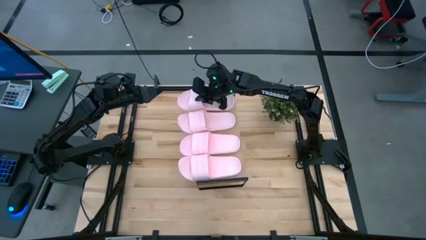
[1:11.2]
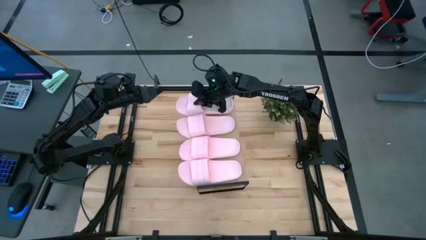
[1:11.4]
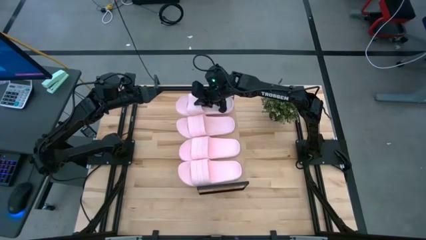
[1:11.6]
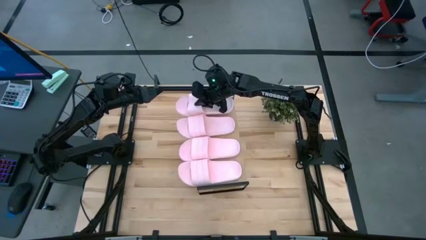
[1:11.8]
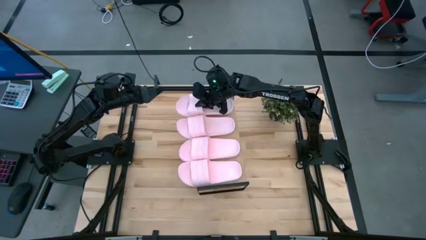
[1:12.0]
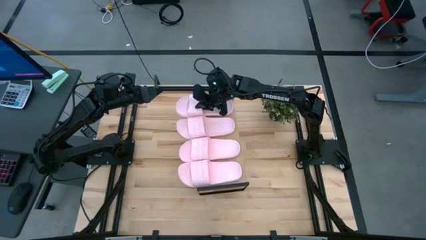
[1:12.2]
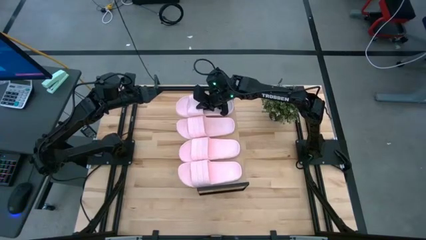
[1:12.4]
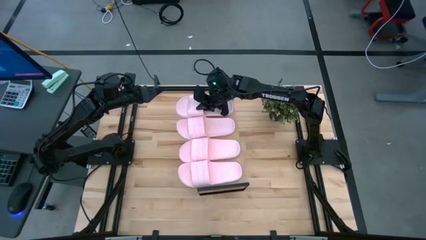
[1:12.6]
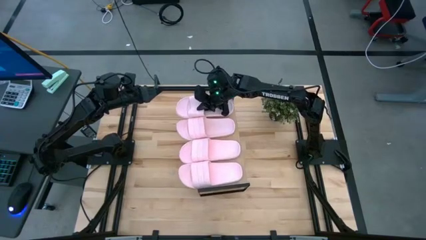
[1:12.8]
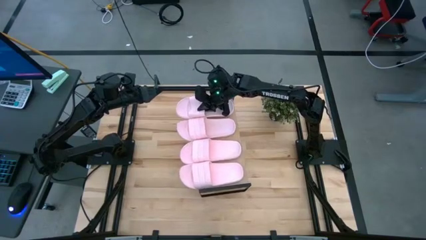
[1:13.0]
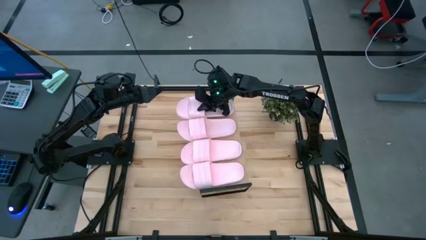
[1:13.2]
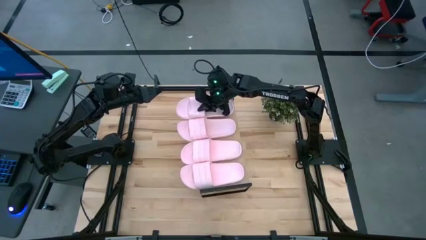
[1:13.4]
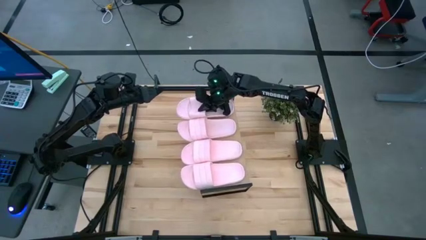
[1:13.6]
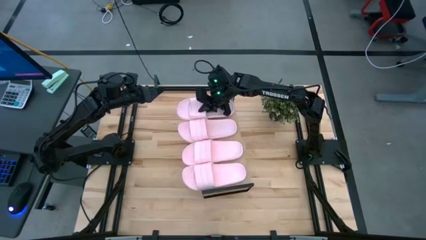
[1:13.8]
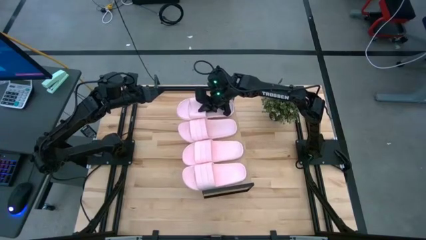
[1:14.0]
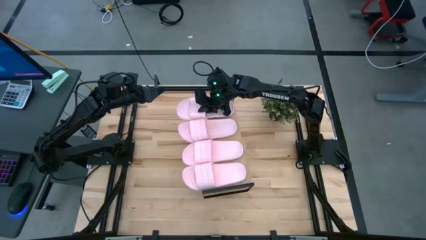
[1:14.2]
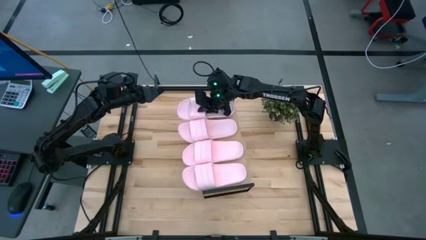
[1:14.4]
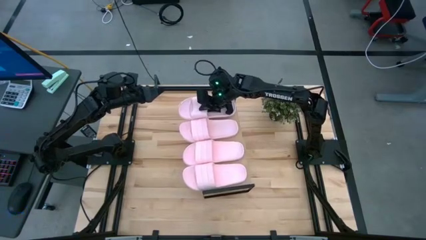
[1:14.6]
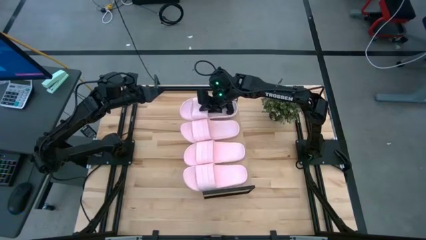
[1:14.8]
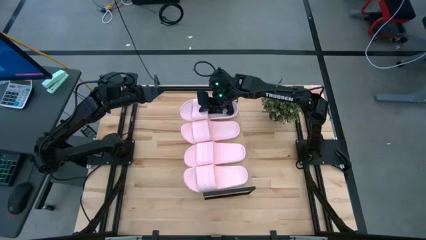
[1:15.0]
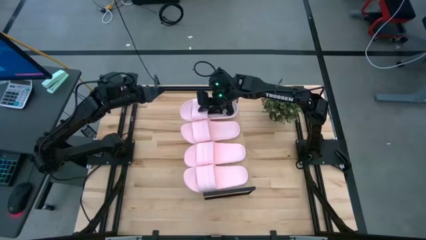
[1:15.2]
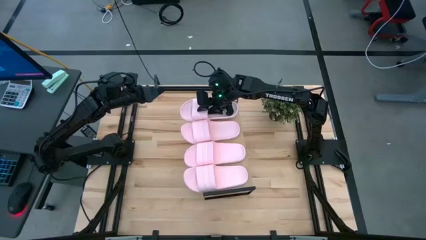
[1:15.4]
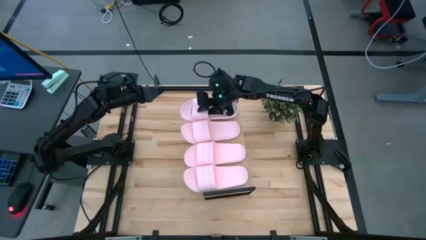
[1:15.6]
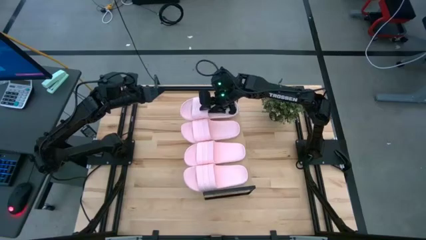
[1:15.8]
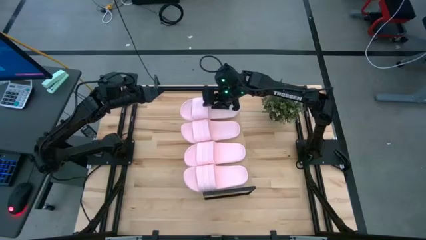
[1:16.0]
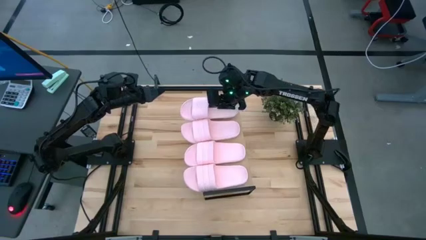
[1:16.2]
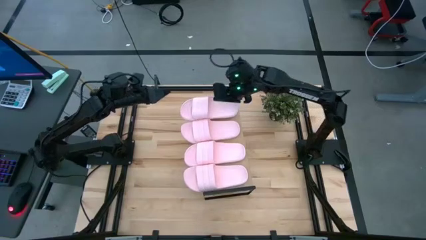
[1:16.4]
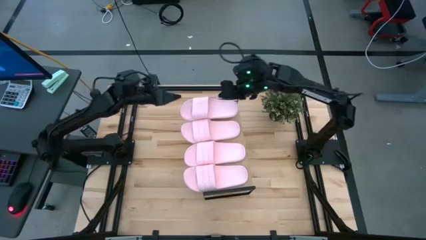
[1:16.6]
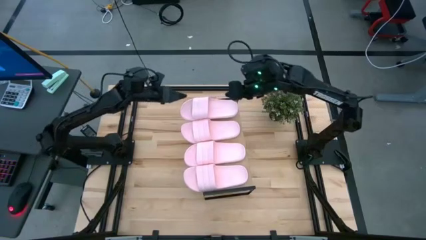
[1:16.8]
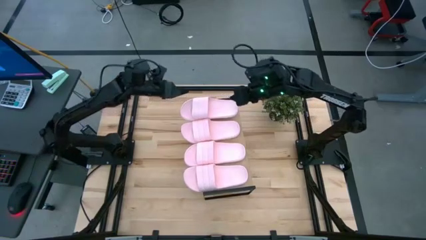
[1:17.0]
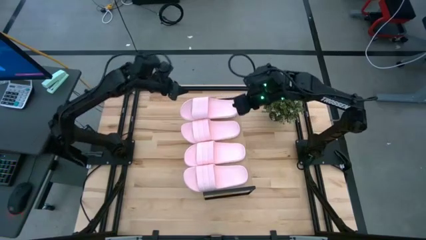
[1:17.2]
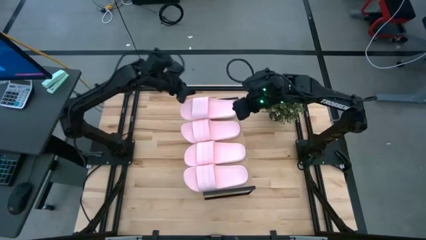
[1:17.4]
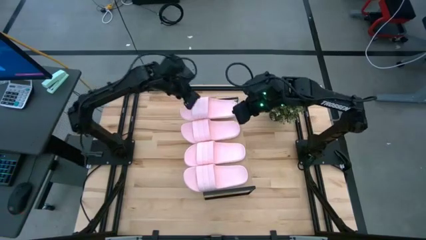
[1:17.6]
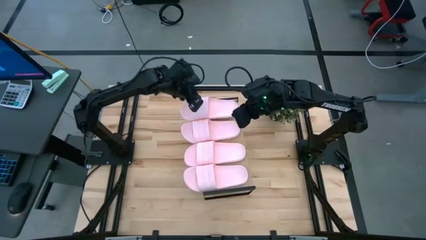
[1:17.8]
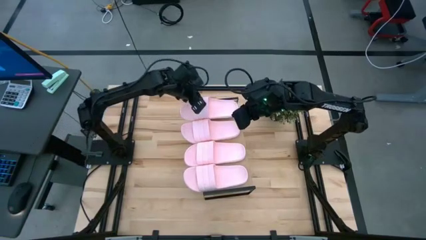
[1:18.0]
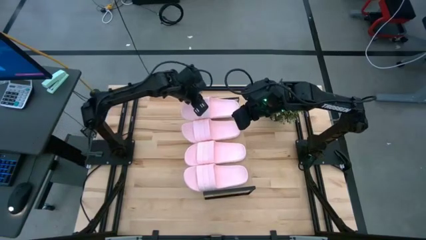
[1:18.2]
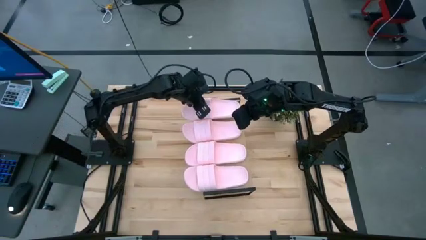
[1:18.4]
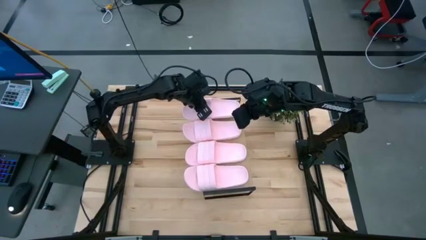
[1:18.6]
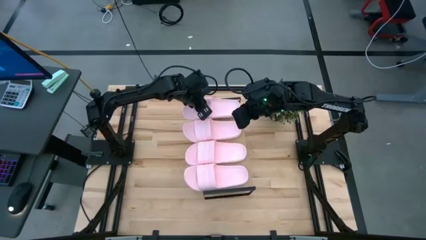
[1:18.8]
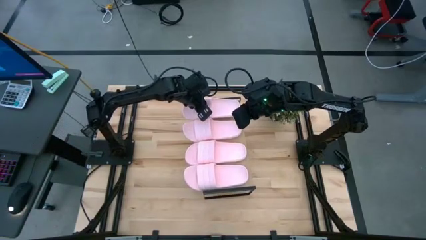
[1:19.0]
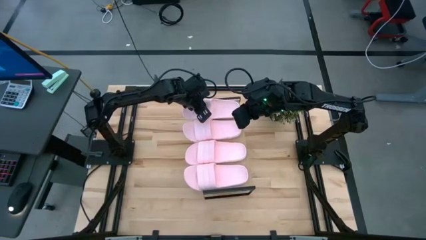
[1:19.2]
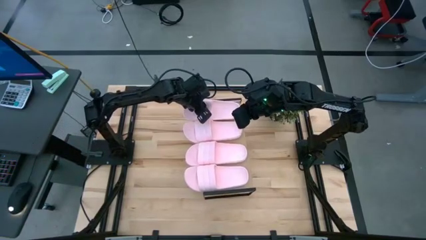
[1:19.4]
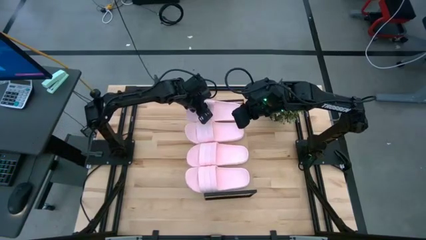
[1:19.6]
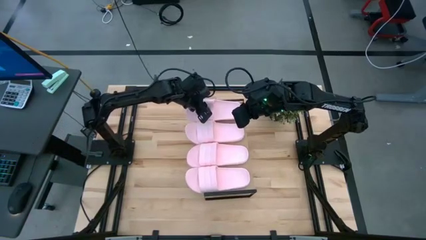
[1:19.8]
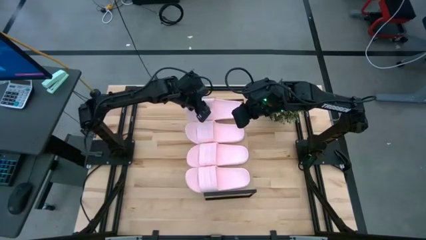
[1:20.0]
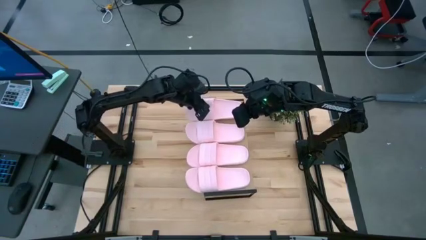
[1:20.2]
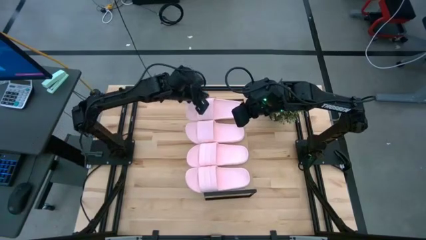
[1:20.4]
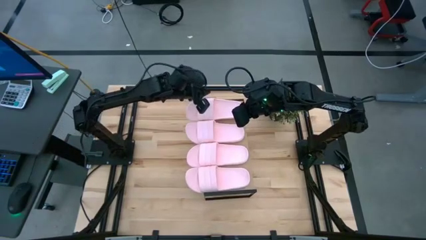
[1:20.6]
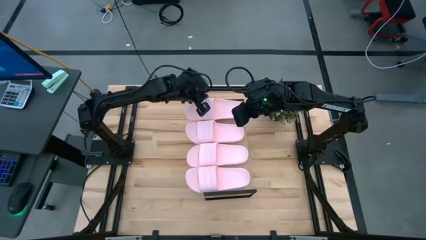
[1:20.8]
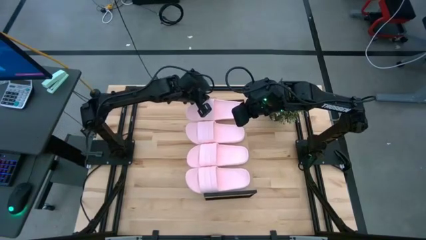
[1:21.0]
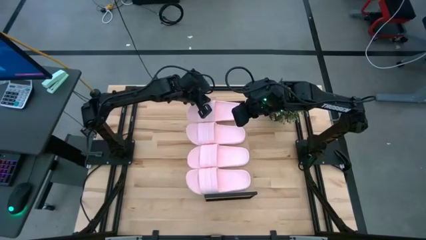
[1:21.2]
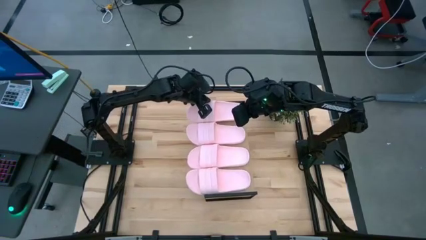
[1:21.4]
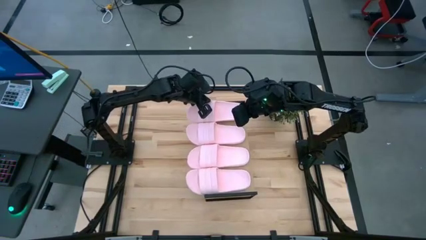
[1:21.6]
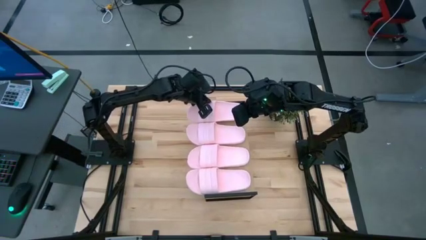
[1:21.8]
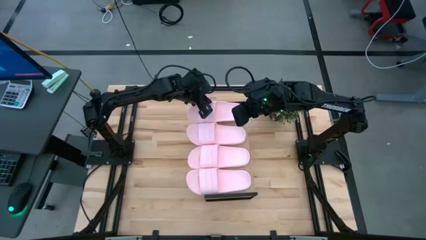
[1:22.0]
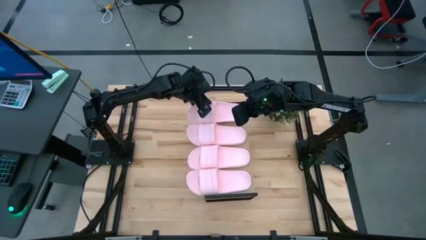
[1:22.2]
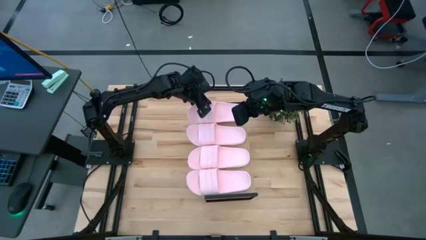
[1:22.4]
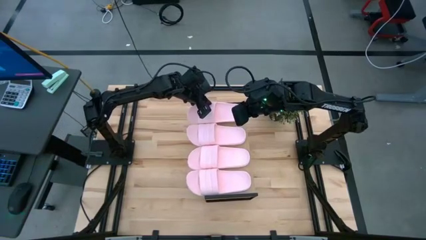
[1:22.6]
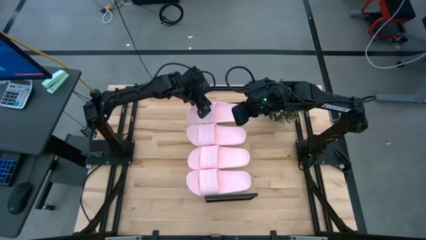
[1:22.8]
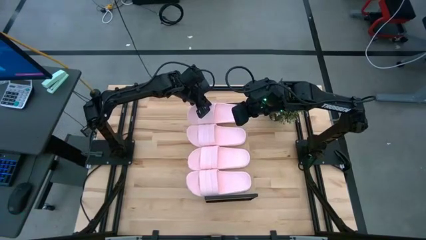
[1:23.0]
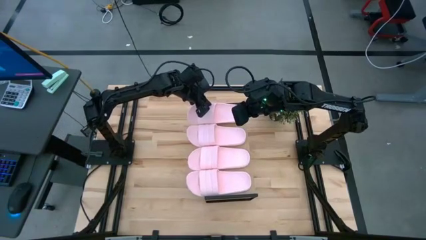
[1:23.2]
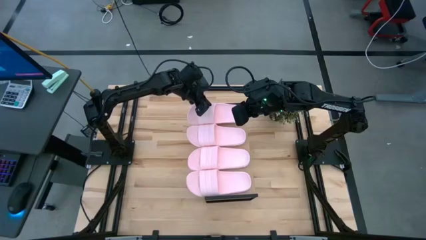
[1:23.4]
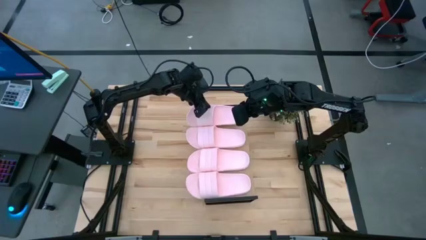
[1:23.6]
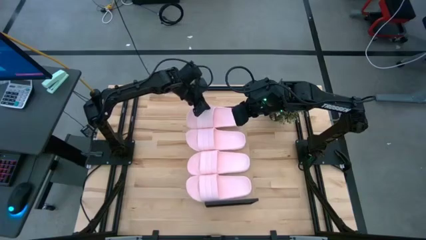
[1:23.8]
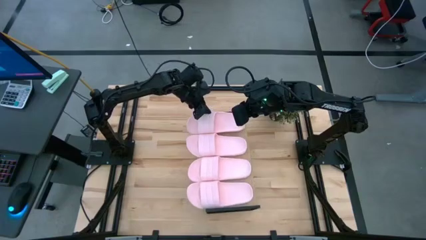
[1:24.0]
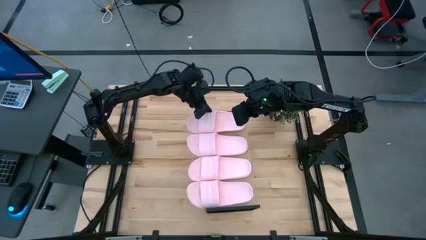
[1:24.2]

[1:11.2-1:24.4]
Task: Pick and place slides into the shelf
Put the pink slipper on the shelf
